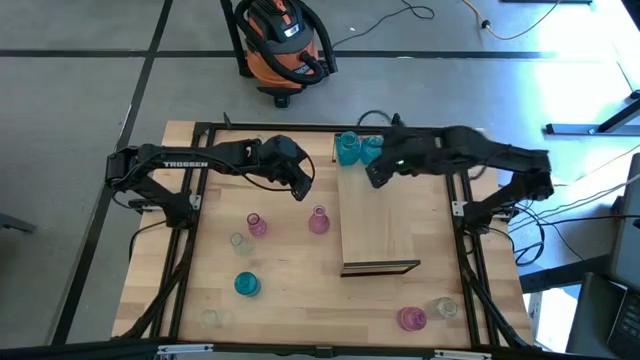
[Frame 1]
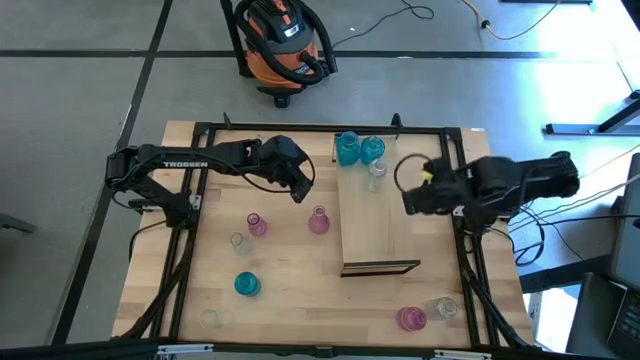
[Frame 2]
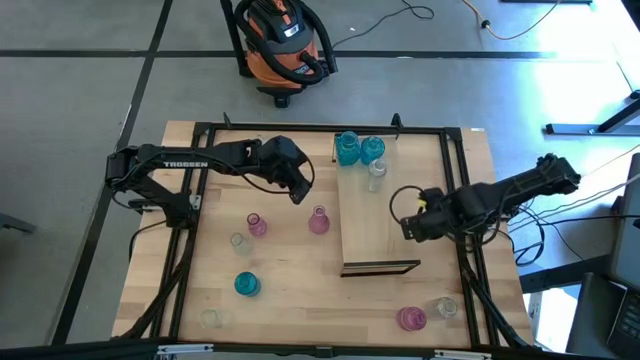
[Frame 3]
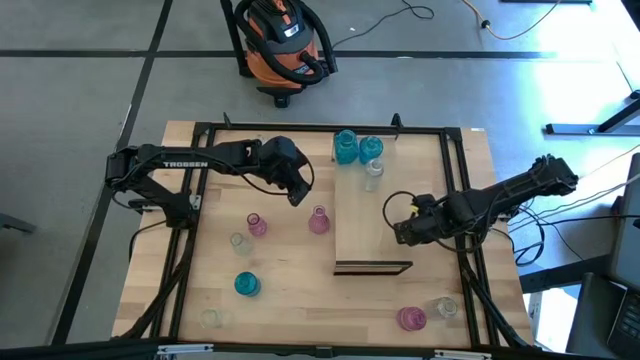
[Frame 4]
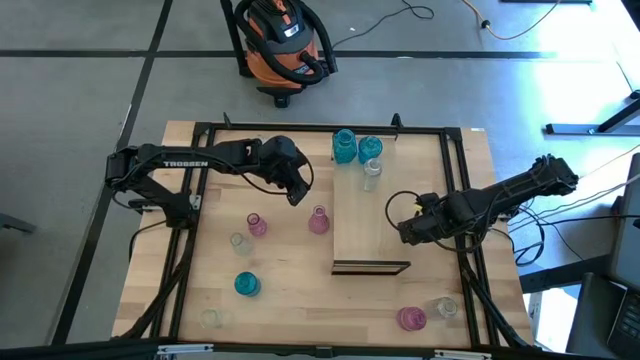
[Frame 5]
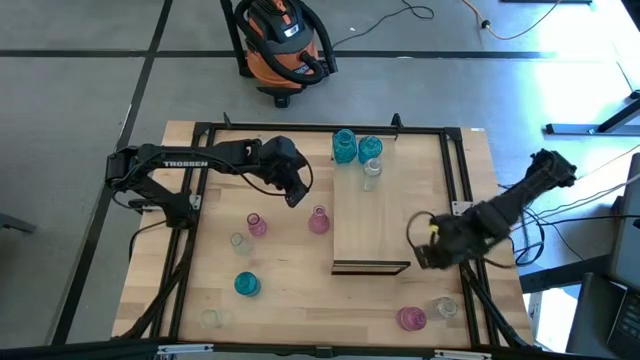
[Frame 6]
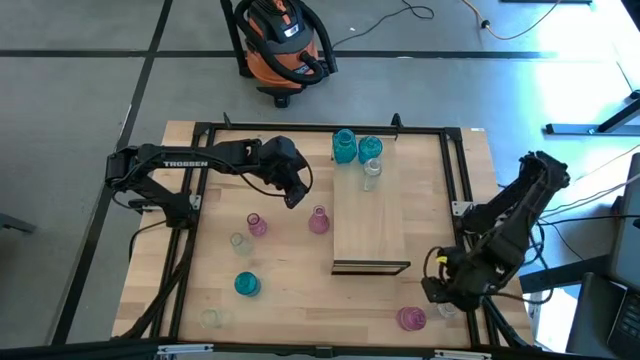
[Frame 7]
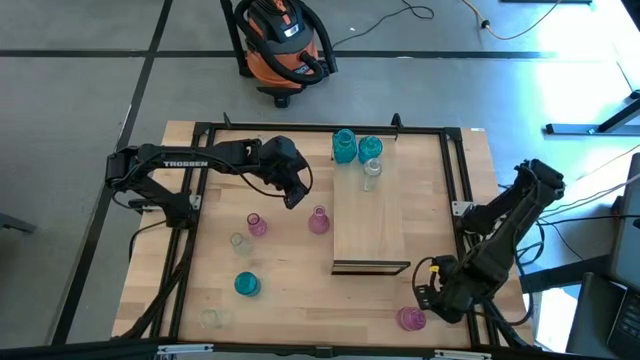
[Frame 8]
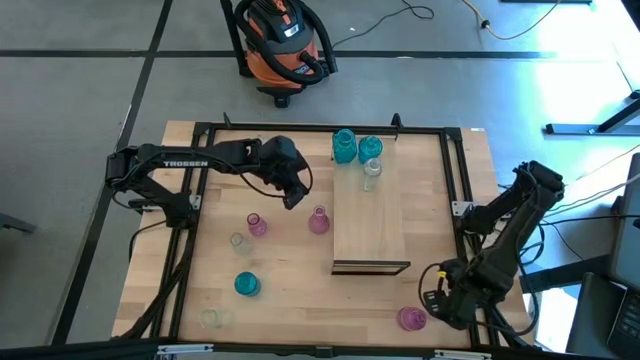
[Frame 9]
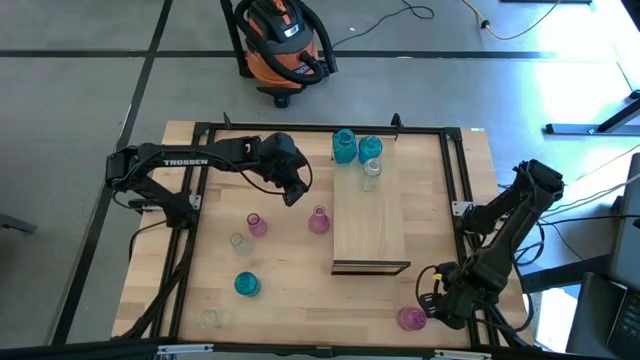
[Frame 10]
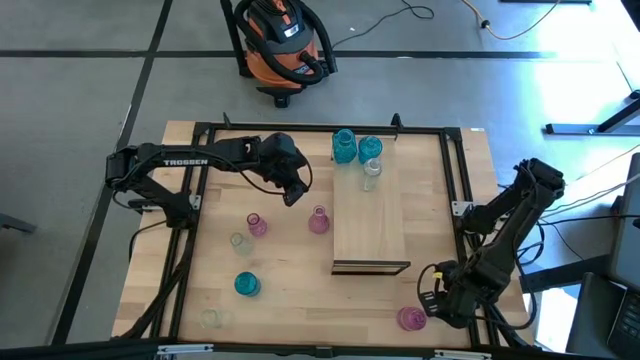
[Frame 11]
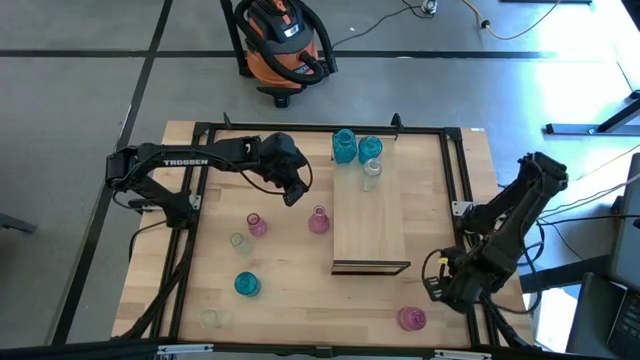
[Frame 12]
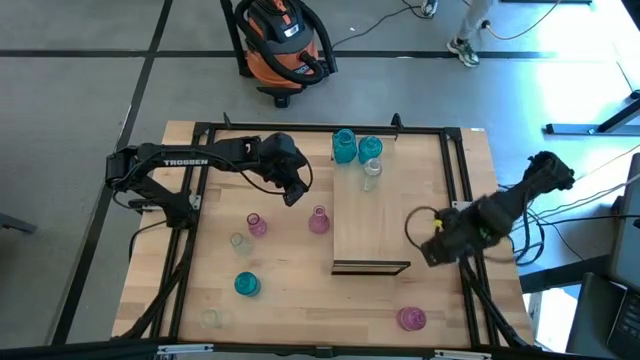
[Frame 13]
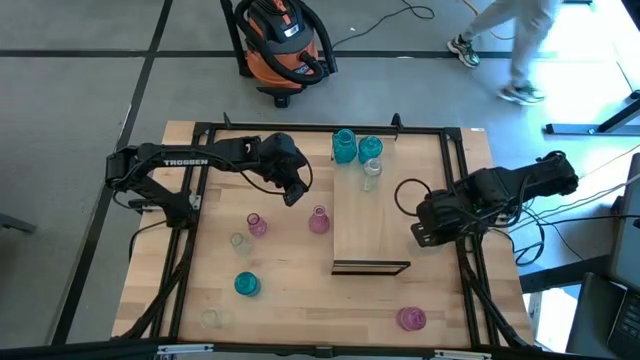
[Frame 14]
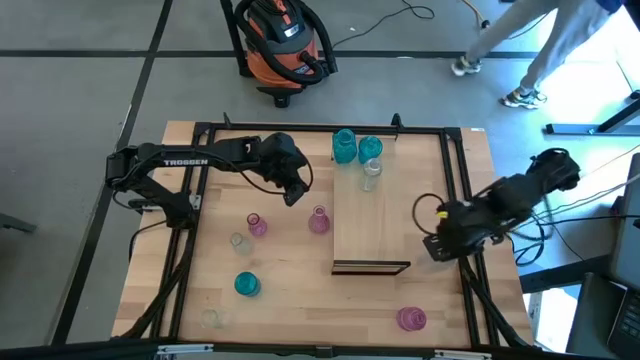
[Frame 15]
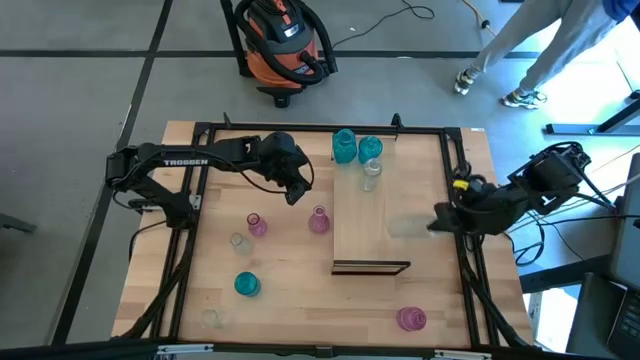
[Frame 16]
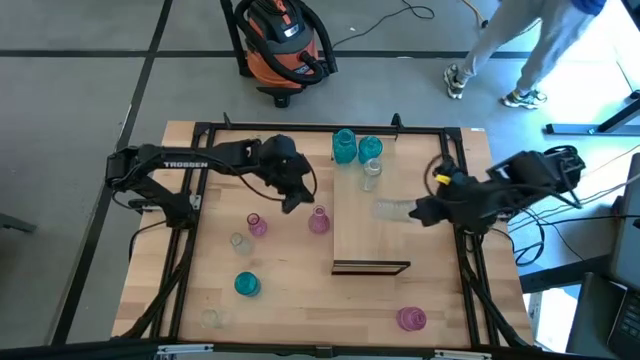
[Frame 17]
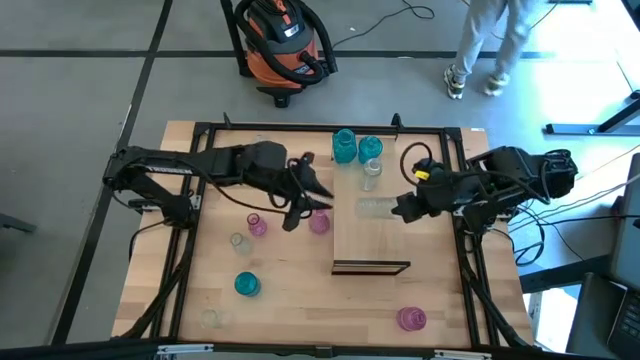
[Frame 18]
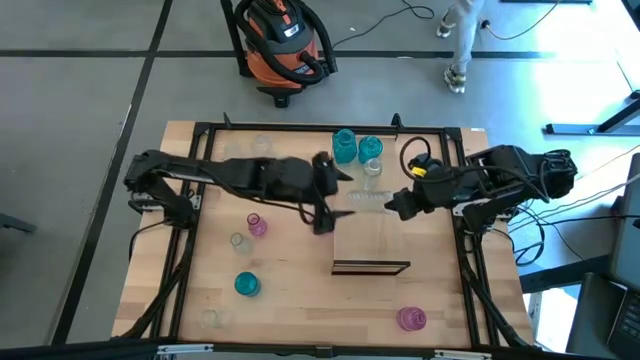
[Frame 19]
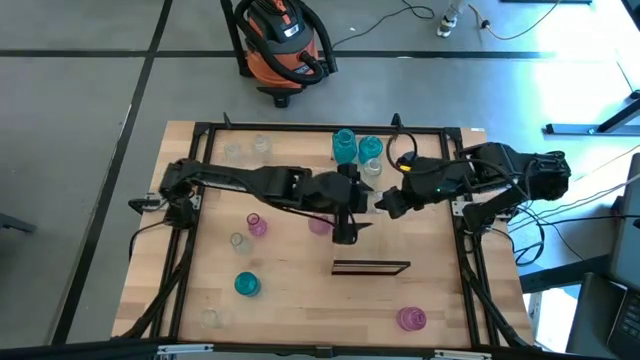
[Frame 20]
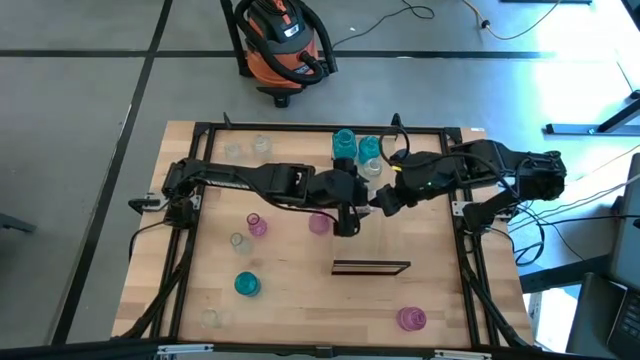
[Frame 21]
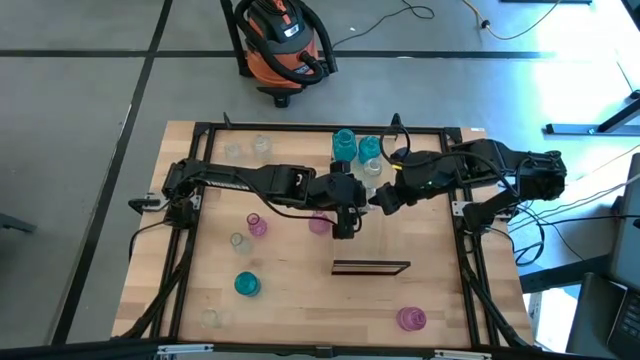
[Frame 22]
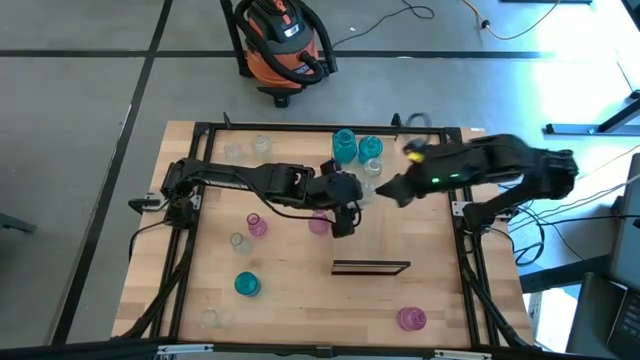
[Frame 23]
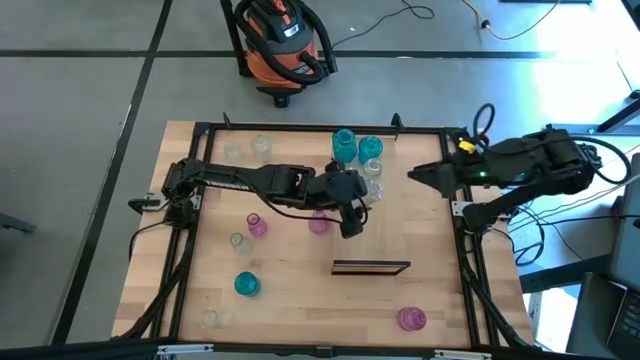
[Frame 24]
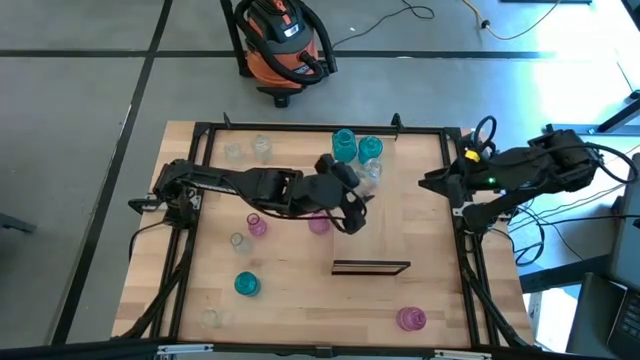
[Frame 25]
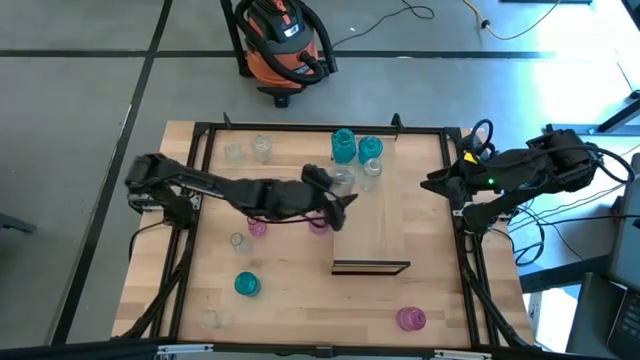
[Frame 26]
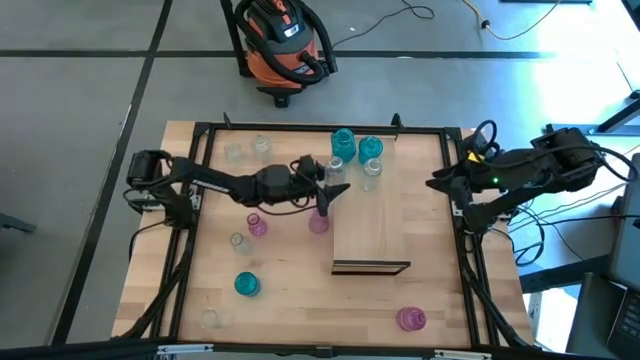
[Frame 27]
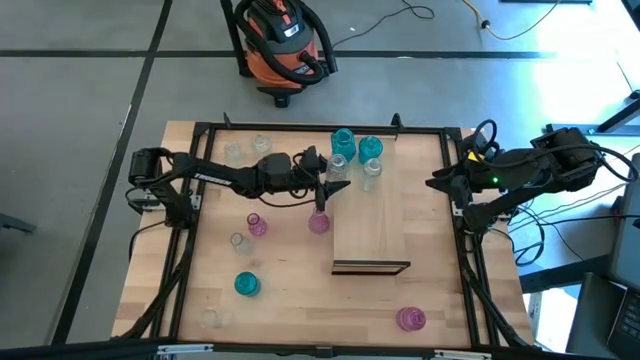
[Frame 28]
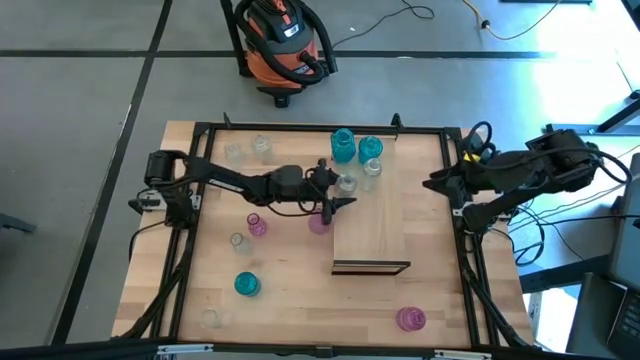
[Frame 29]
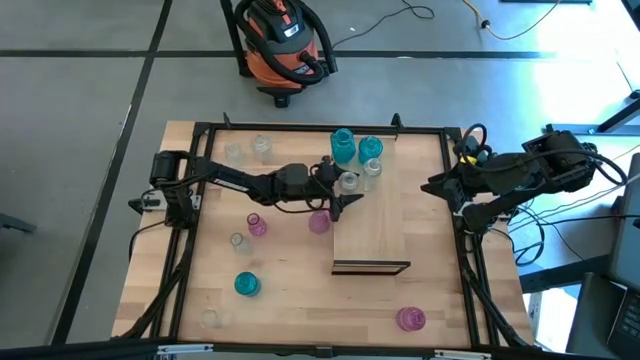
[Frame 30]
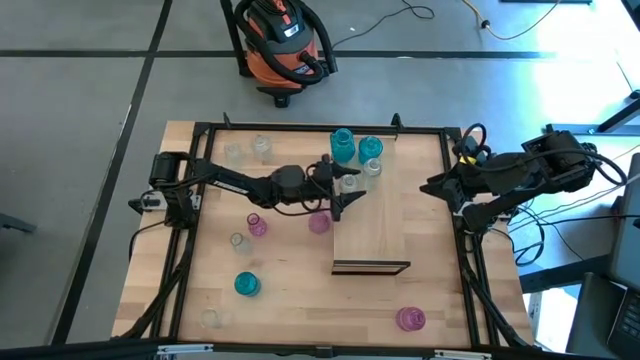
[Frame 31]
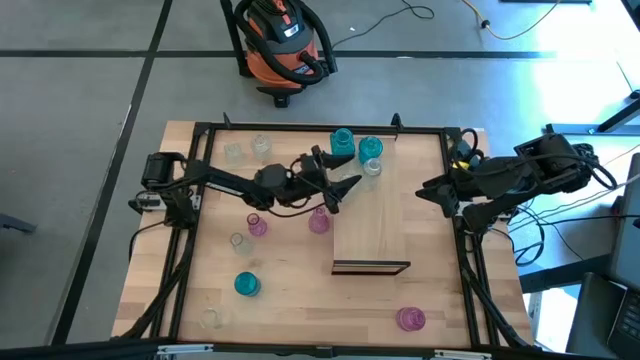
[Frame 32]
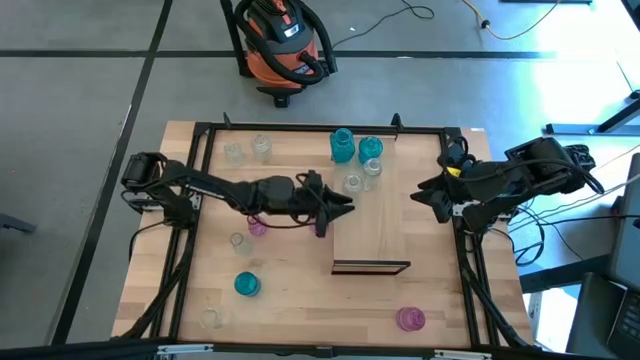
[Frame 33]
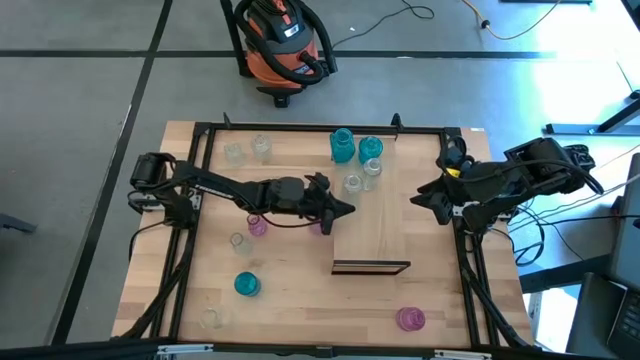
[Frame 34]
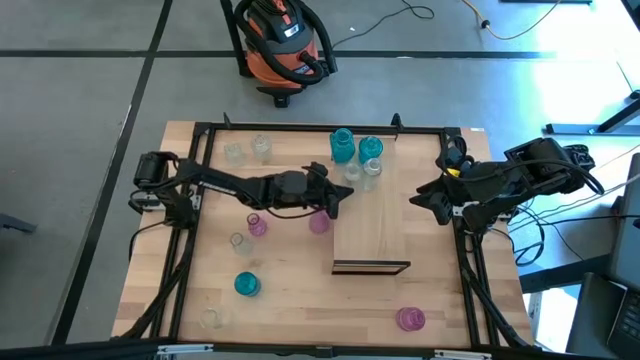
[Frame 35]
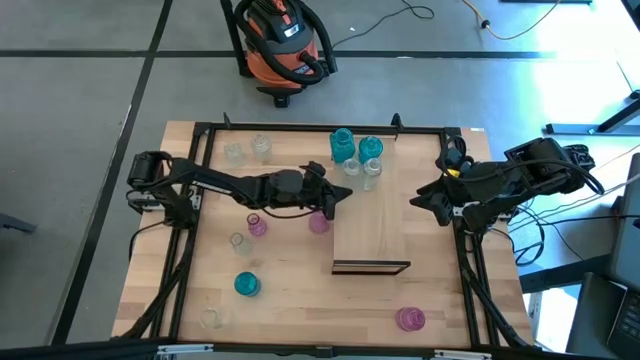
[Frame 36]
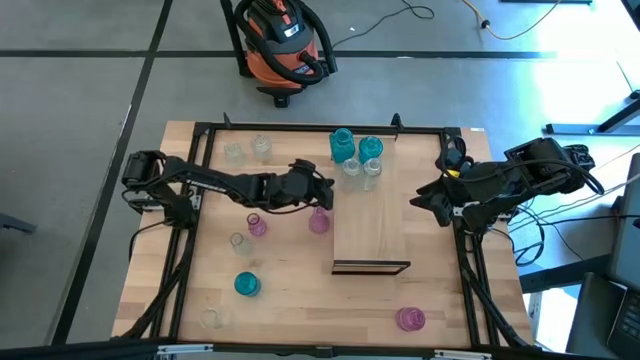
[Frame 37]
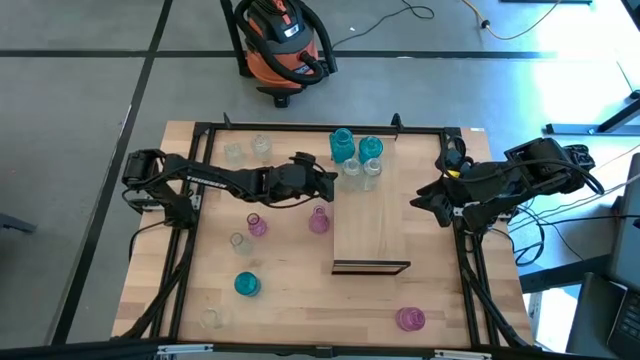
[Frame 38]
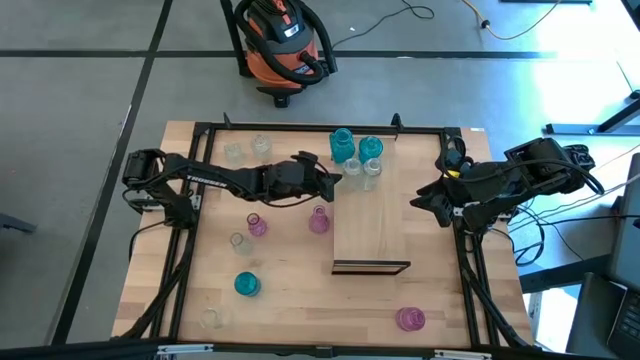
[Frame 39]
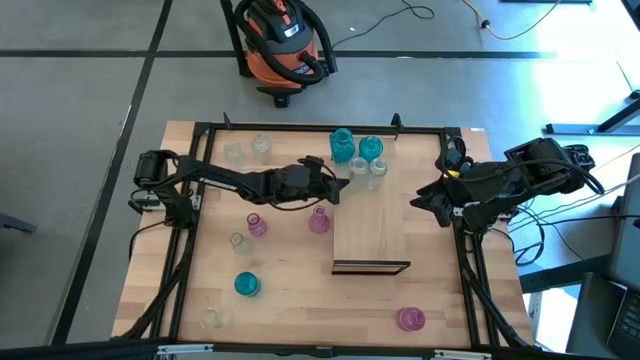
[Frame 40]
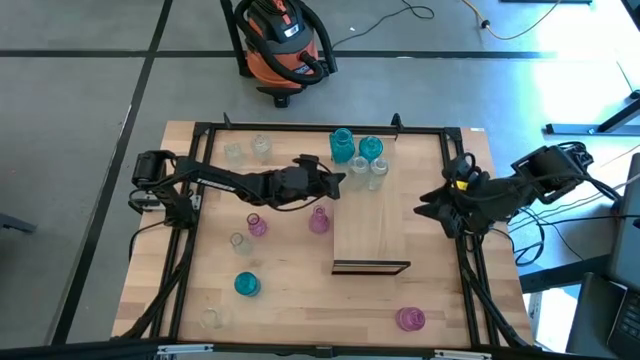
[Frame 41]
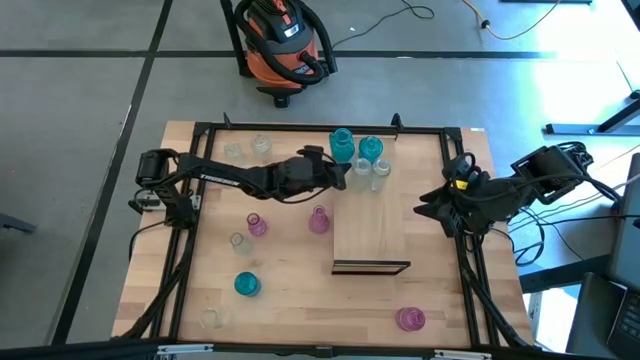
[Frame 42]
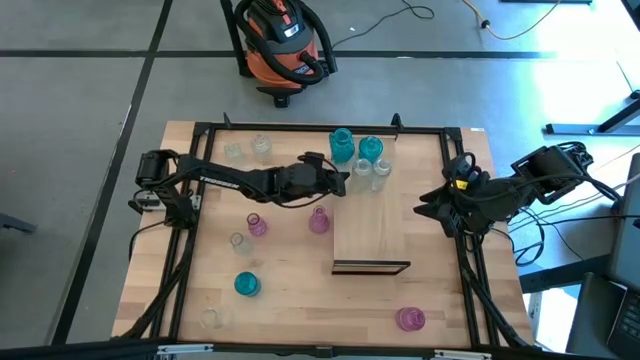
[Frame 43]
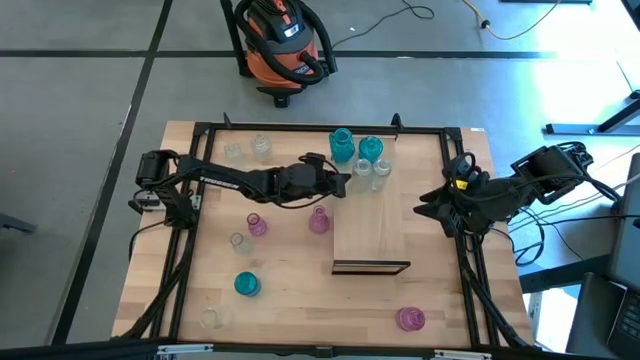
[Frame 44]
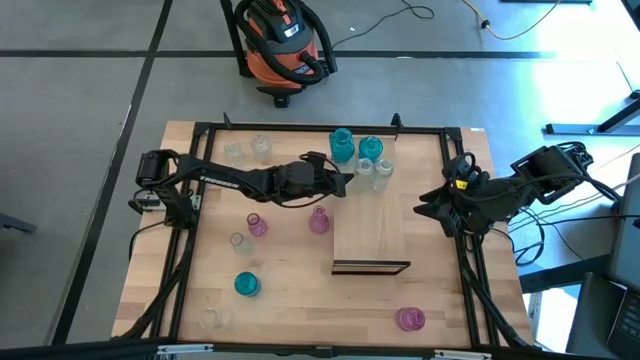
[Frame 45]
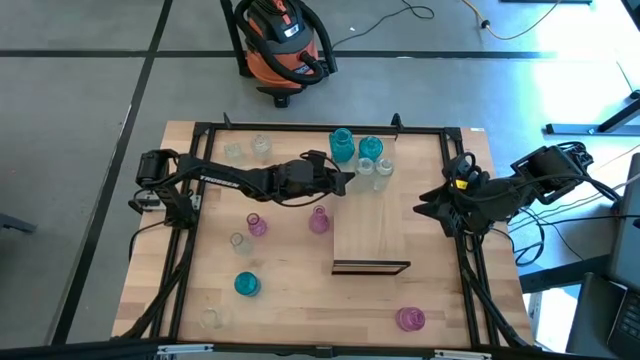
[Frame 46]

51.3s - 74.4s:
Task: sort vases onto shelf
Put the transparent vase on the shelf aligned with the other transparent vase
